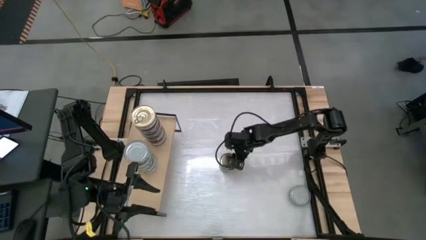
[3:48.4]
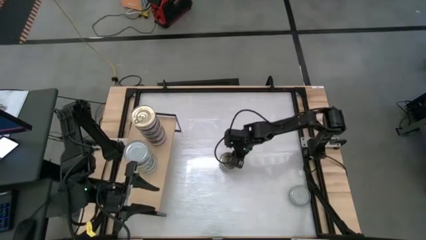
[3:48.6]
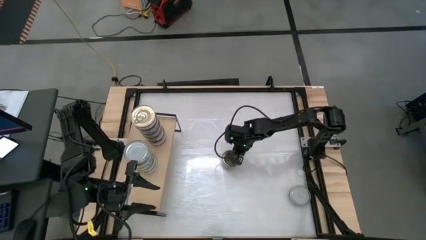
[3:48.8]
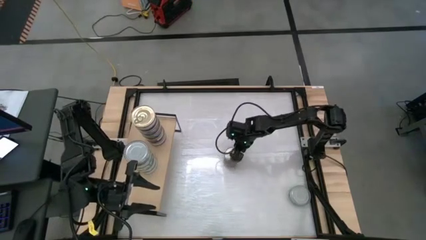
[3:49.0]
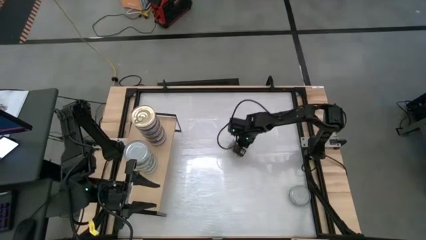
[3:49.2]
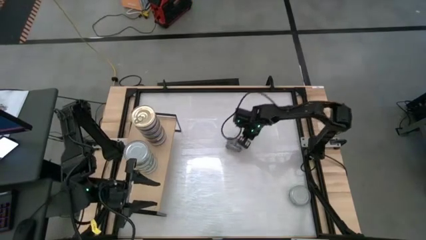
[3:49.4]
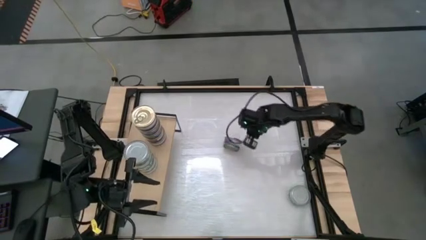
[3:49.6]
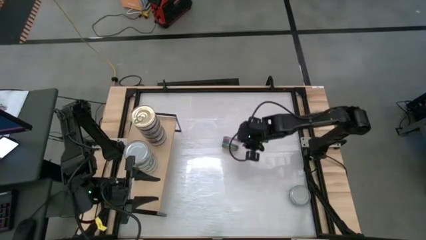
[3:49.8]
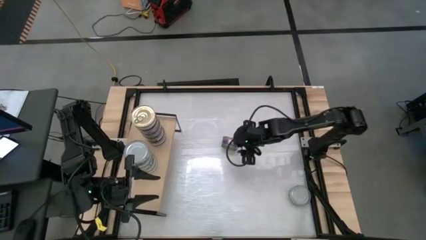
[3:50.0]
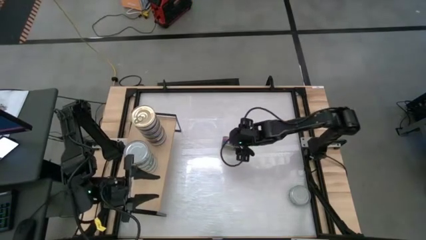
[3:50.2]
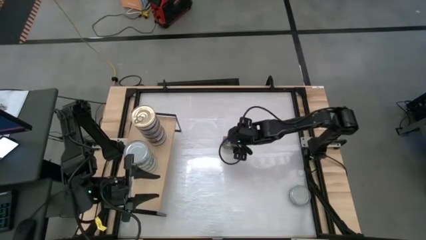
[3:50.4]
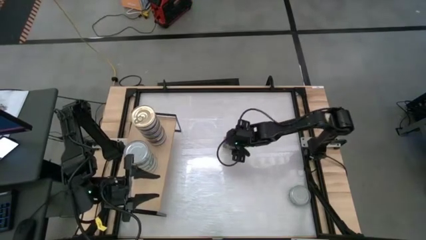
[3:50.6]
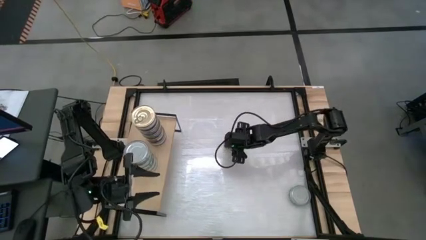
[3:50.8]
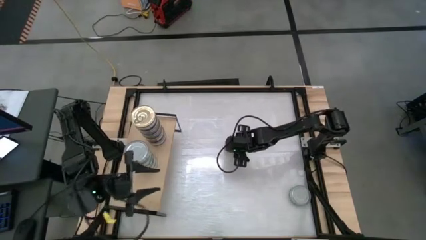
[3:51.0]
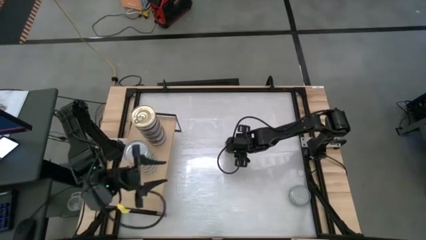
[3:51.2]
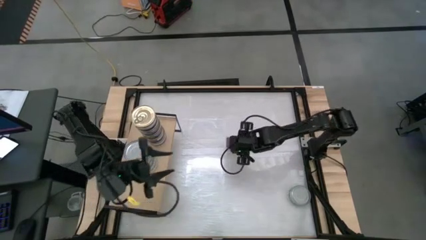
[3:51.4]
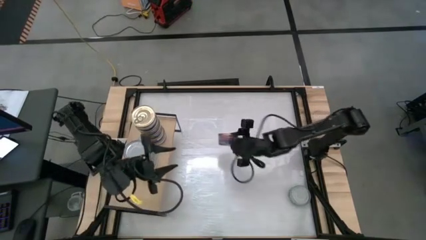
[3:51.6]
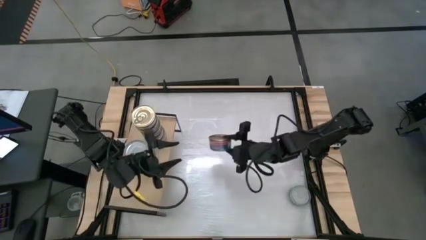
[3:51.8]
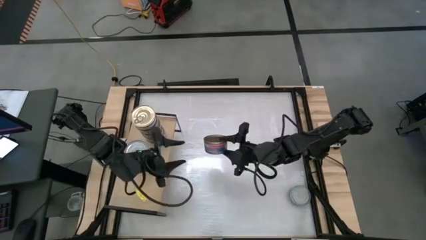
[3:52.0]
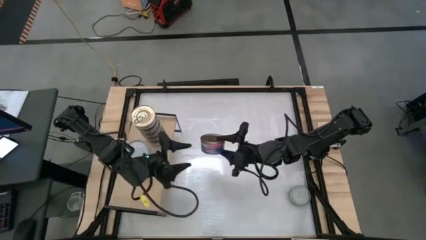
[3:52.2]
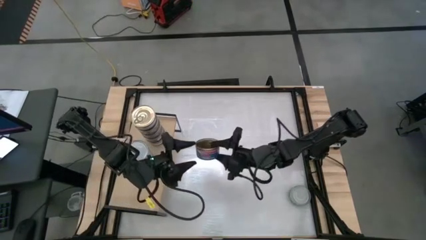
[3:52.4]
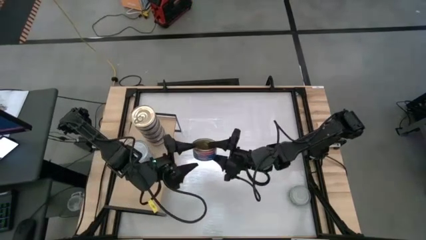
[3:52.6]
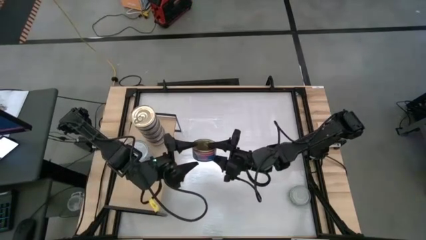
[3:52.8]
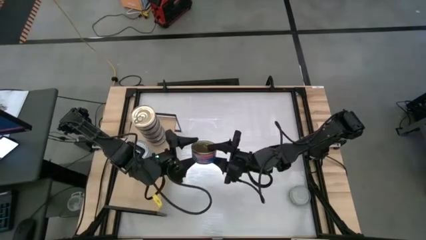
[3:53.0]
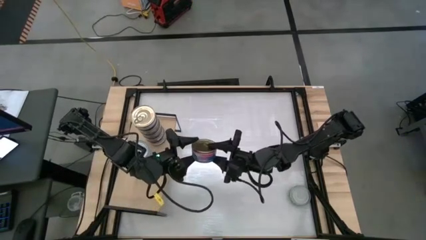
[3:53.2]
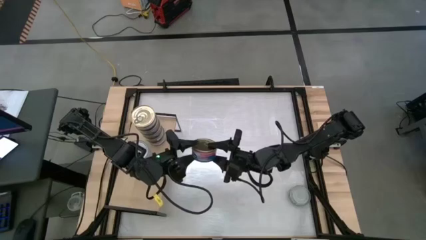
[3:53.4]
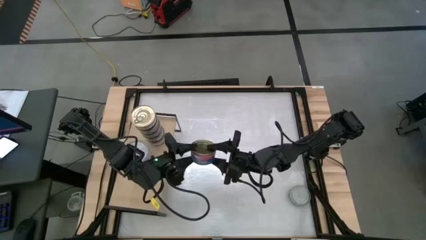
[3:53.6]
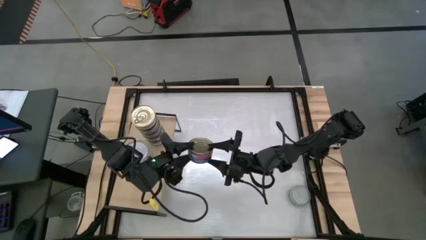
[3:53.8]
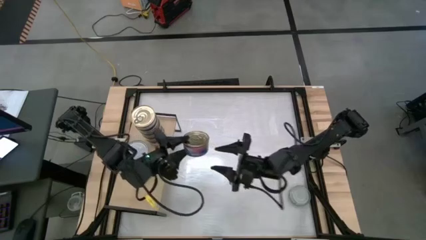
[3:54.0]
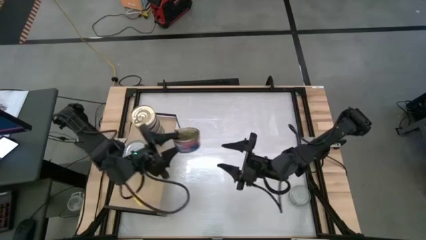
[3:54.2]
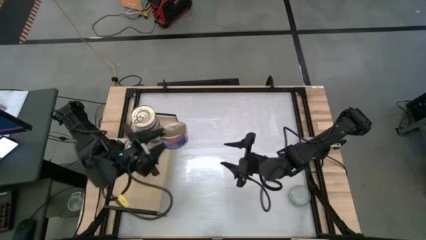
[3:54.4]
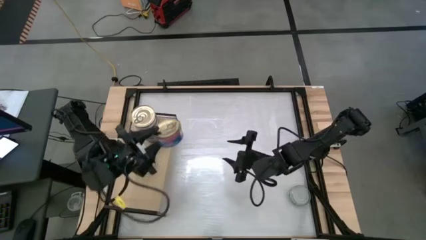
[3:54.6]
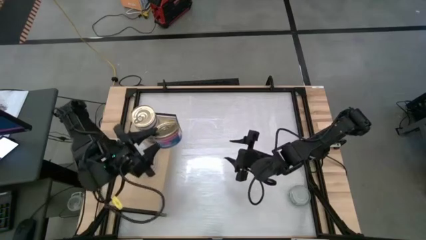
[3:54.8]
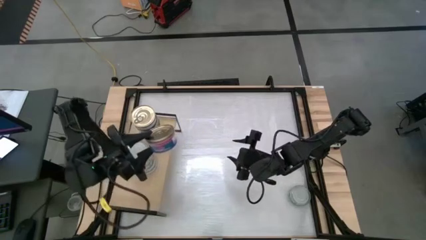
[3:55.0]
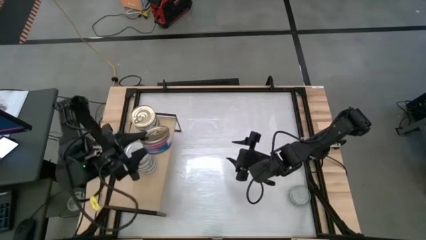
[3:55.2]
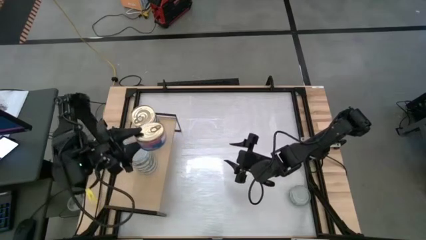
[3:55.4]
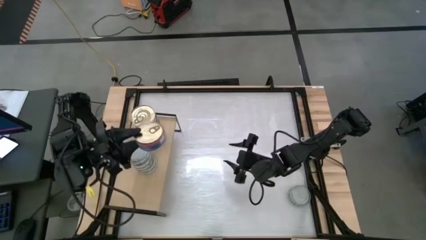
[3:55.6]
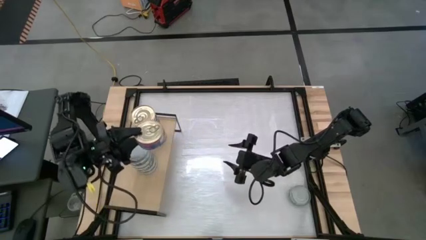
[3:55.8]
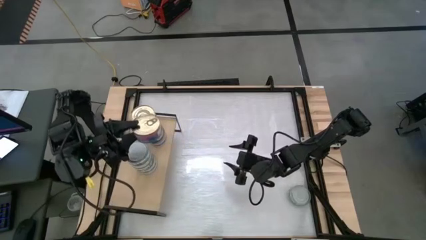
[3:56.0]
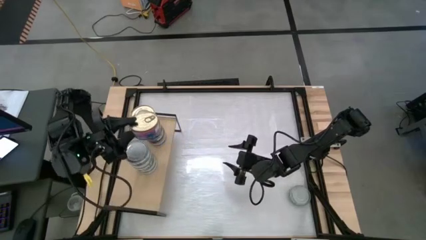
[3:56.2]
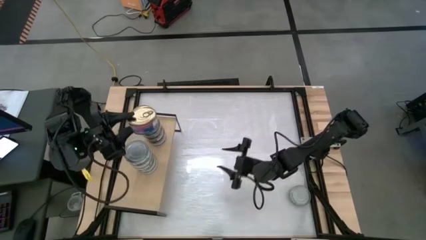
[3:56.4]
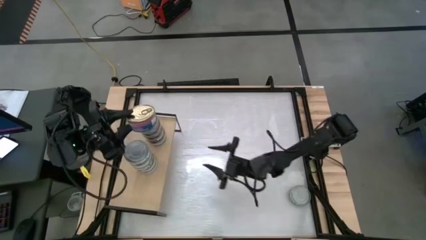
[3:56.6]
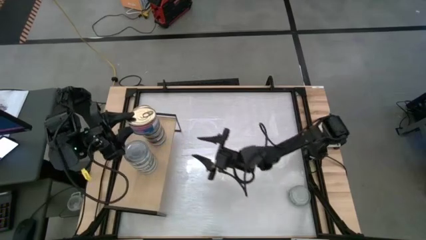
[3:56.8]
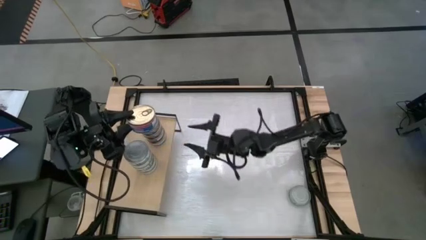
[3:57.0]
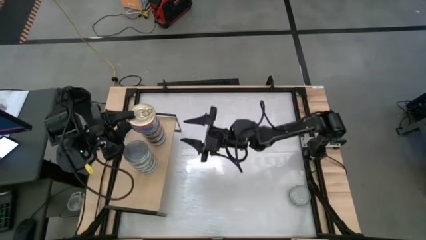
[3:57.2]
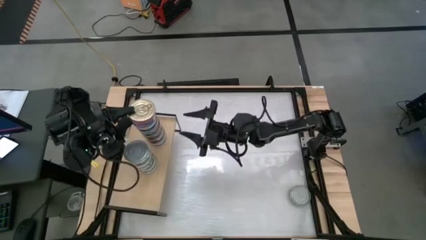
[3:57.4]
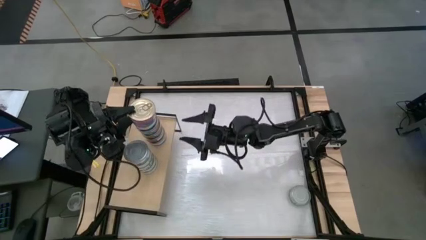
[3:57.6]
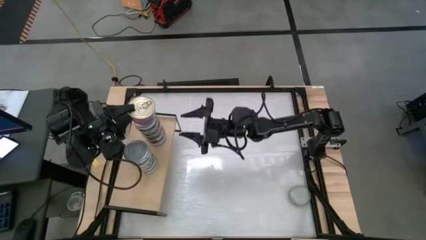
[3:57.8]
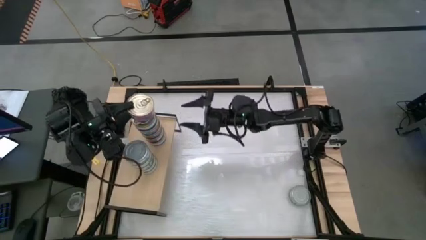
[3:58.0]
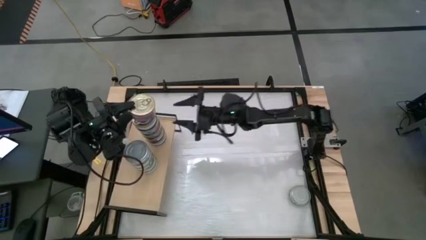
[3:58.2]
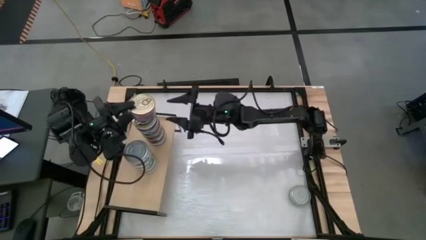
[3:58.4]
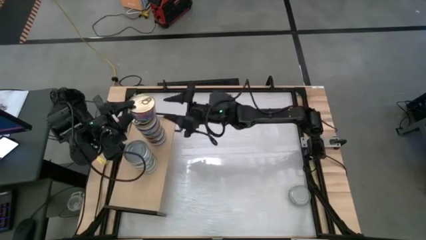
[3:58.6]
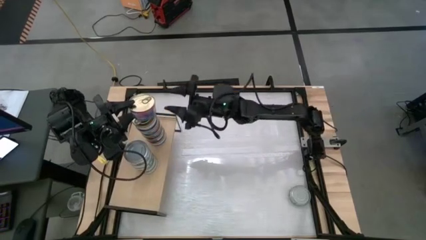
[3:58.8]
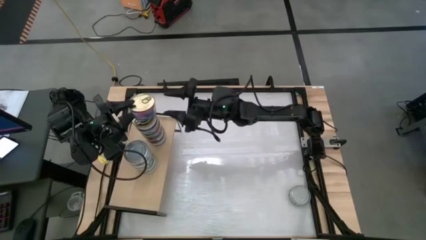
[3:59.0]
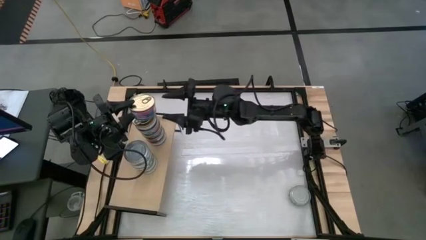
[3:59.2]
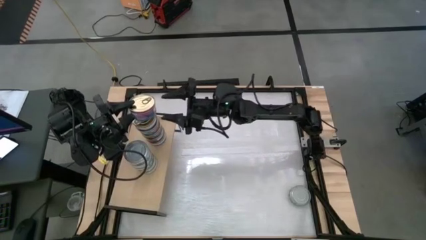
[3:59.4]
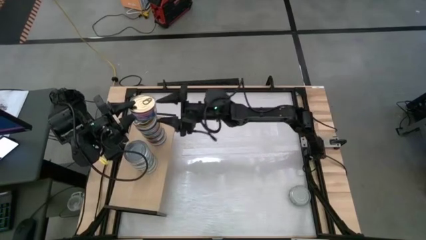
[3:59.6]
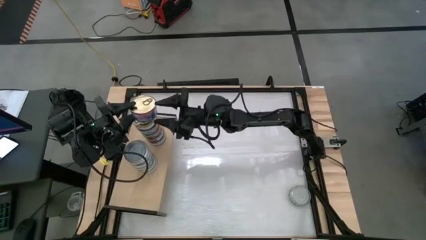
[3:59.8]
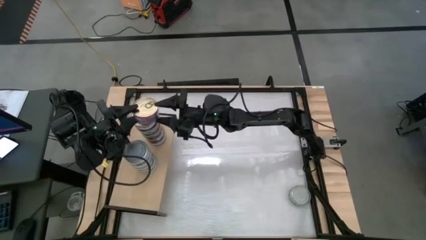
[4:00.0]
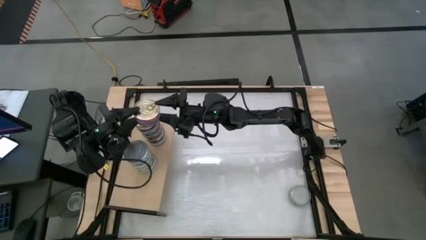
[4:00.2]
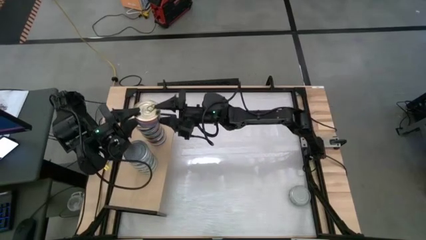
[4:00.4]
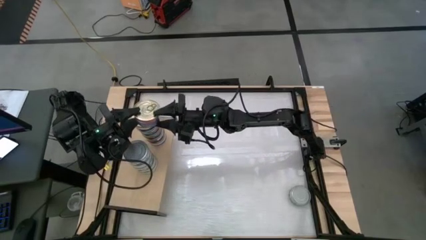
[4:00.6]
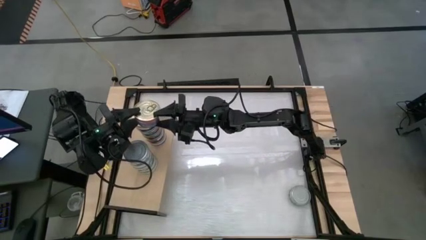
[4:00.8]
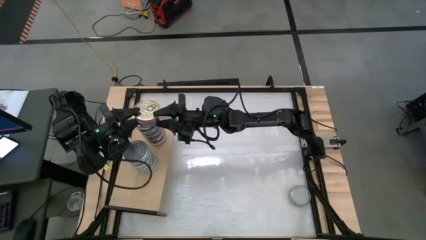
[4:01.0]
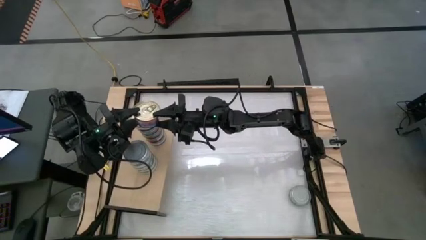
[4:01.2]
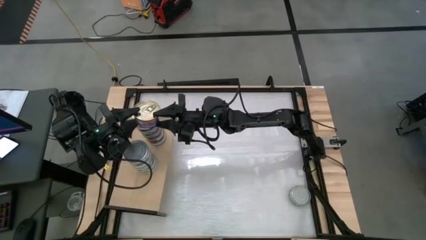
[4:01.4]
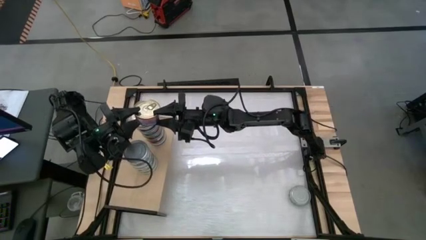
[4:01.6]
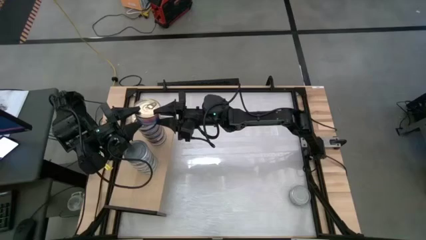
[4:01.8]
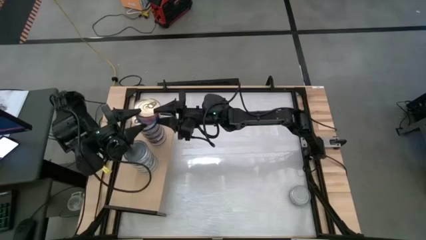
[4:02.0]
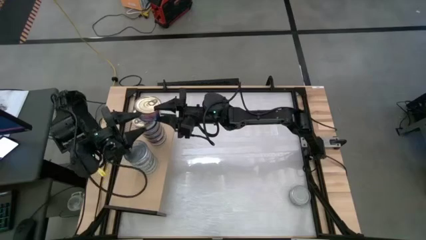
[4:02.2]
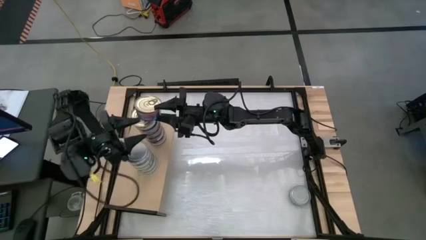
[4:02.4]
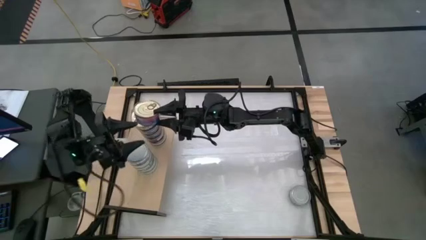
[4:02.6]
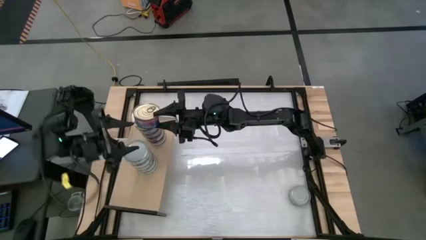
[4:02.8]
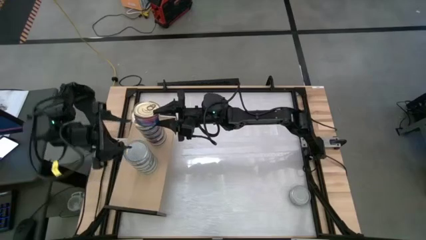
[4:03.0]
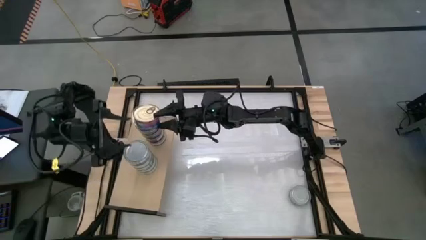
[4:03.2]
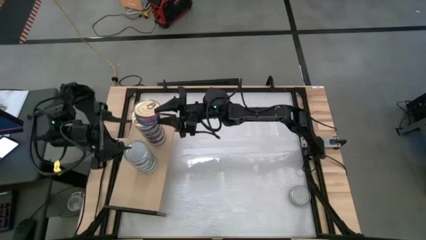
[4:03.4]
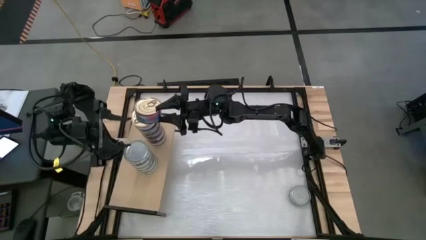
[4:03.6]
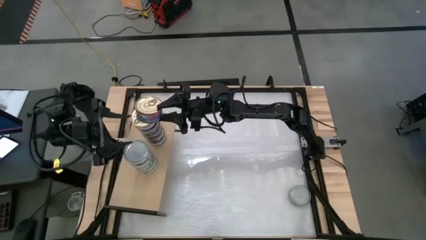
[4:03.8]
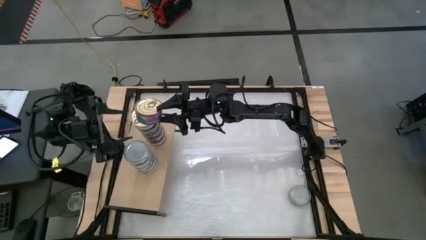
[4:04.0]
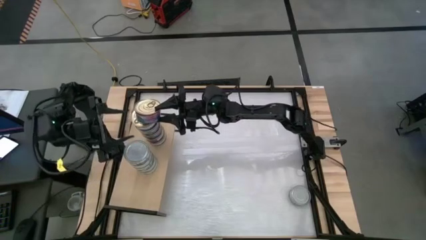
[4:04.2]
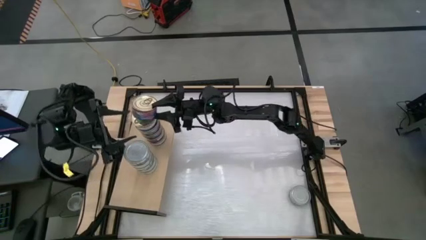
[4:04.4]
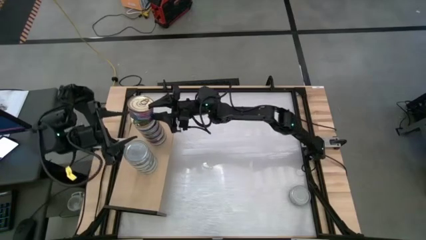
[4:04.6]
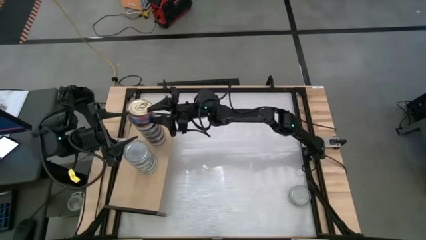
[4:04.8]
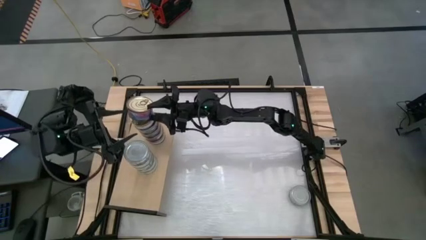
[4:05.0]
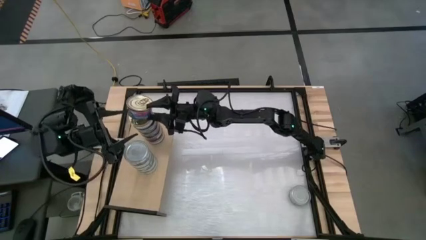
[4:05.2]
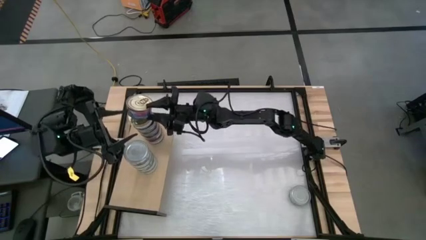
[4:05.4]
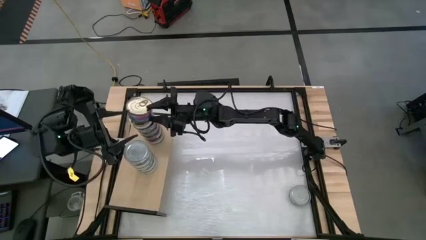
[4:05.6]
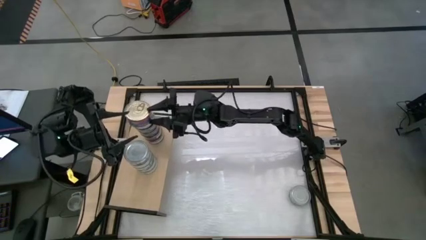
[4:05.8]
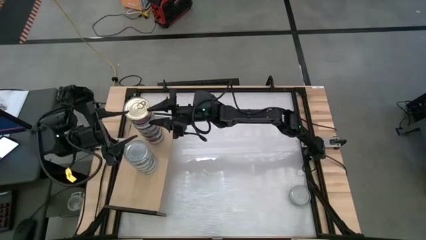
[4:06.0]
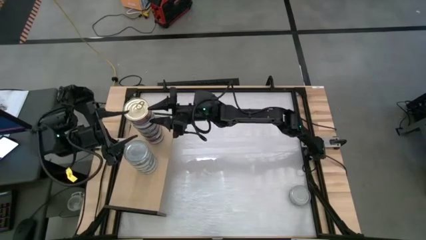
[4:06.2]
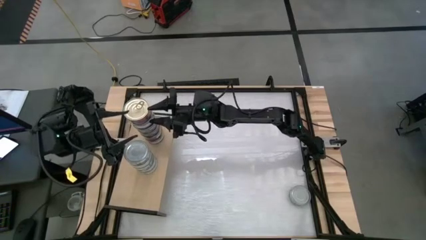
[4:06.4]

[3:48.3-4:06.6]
Task: Stack canned seafood by type on shelf
Stack the blue tuna can on top of the blue tuna can on the shelf
